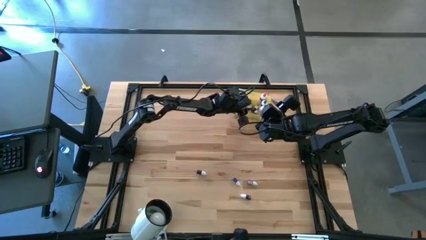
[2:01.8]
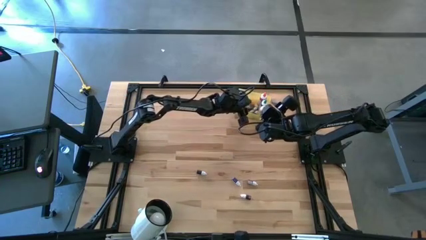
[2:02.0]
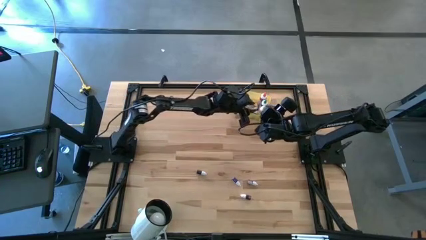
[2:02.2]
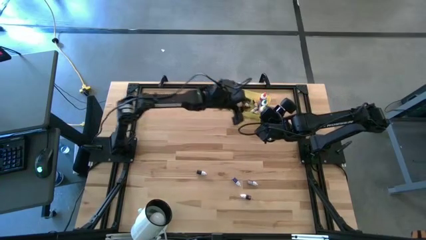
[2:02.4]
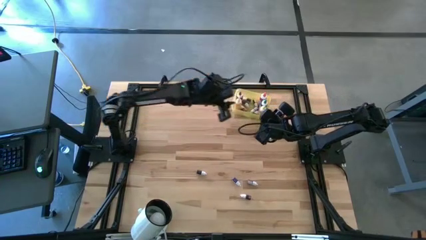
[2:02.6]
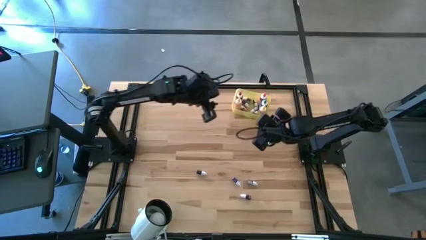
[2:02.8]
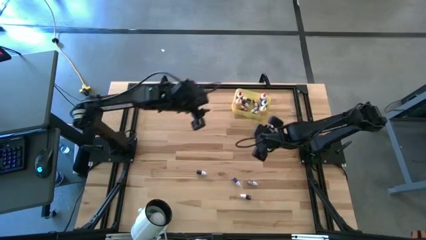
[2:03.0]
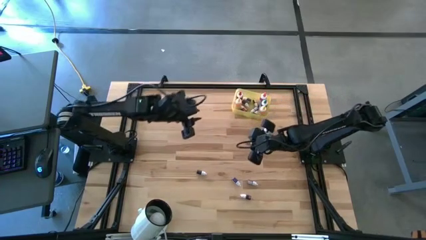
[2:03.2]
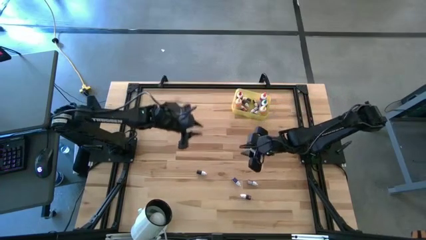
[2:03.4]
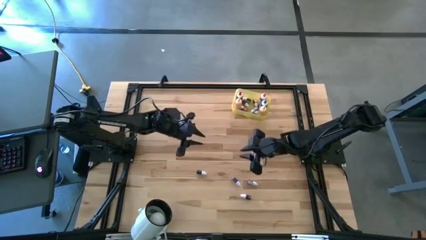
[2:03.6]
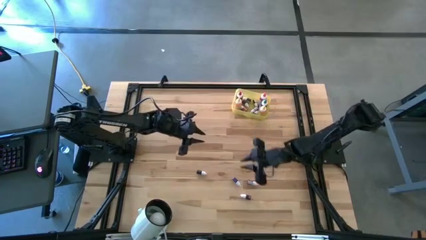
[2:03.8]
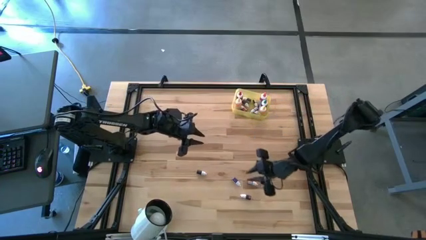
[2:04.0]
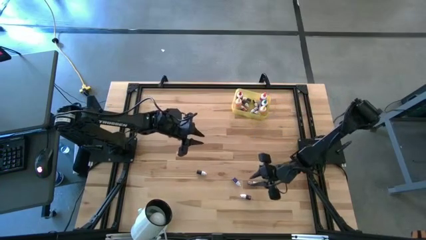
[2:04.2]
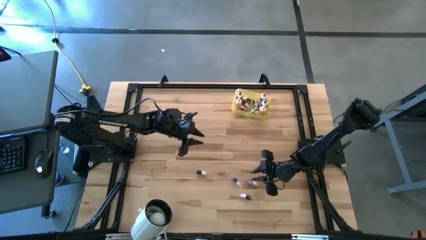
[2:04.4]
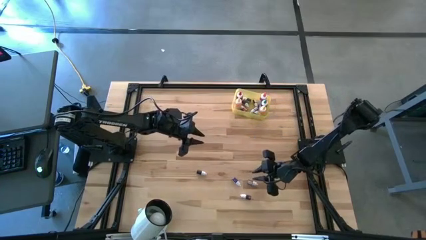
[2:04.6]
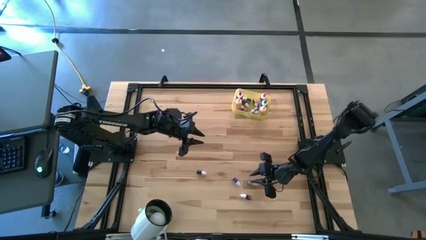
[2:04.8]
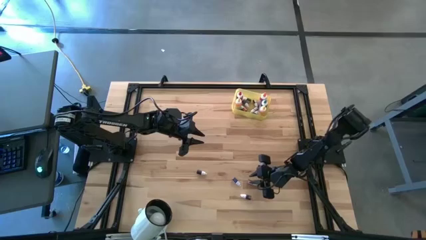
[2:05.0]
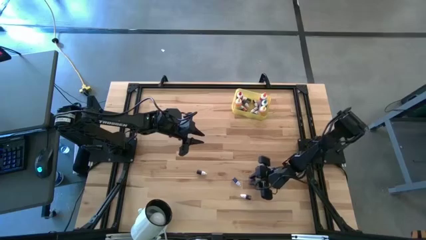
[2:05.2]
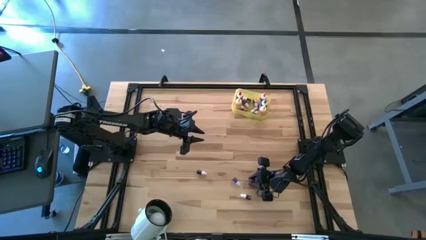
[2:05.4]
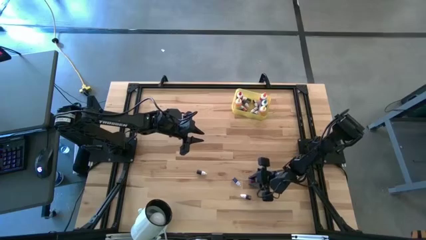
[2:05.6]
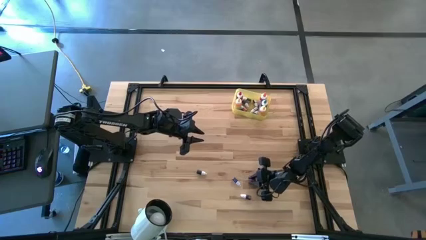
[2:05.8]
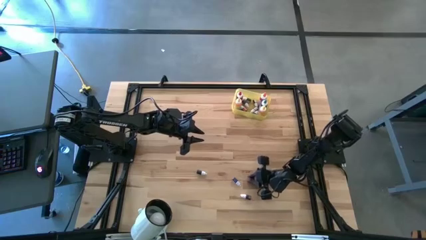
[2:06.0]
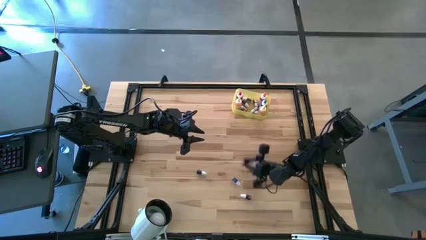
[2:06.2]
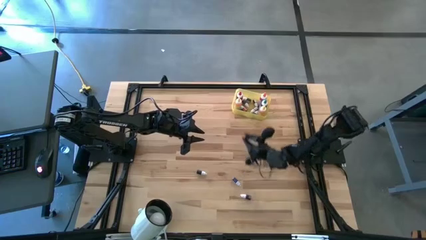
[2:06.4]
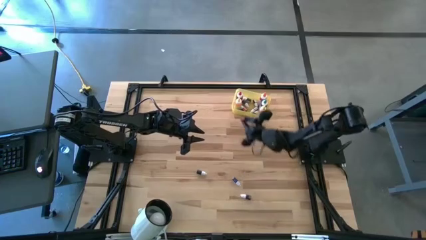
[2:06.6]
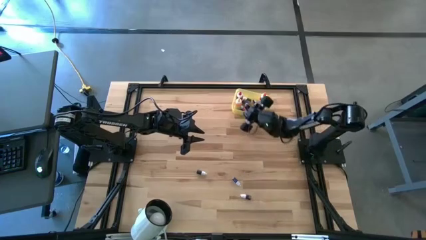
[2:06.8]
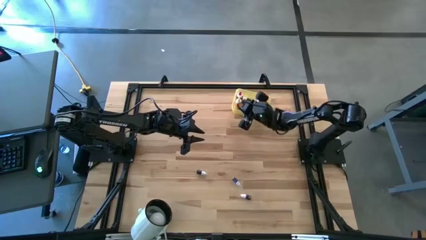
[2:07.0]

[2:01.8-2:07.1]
Task: Pick & Place food coloring
Put the small orange food coloring bottle into the yellow bin

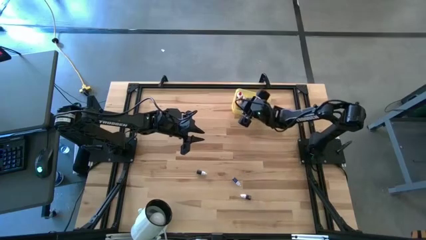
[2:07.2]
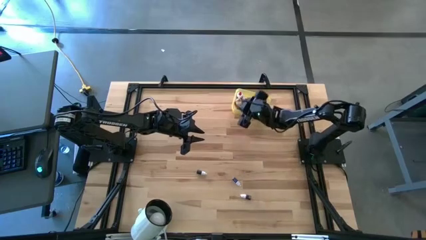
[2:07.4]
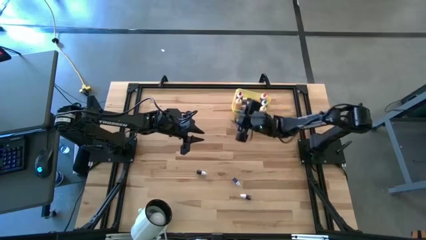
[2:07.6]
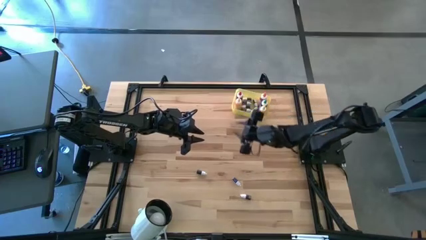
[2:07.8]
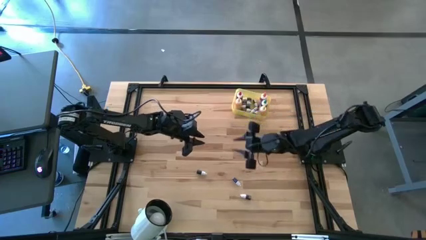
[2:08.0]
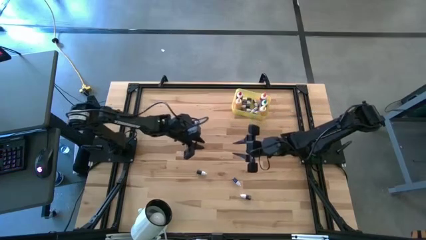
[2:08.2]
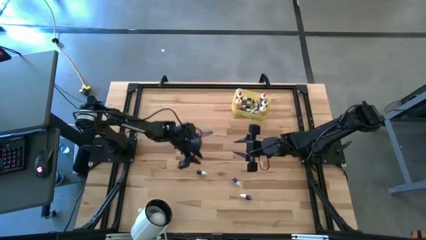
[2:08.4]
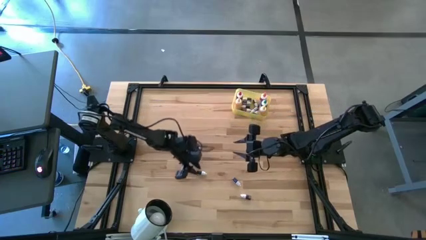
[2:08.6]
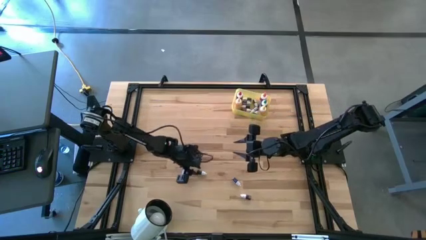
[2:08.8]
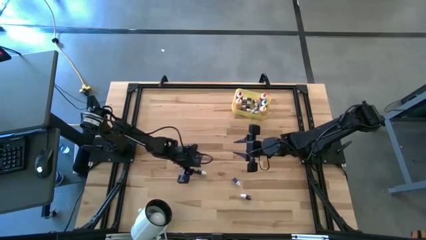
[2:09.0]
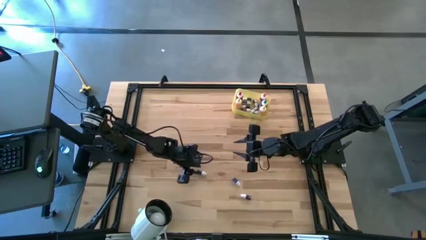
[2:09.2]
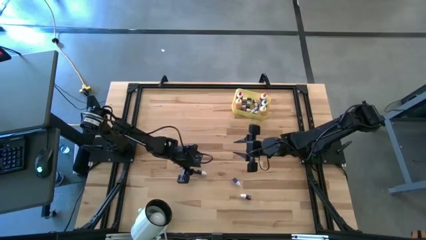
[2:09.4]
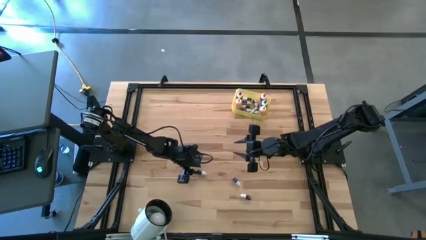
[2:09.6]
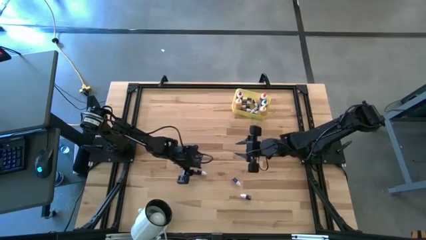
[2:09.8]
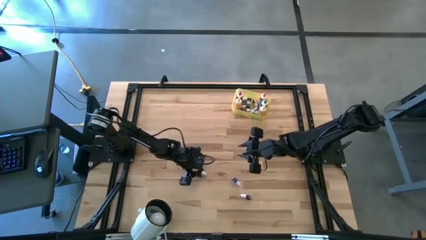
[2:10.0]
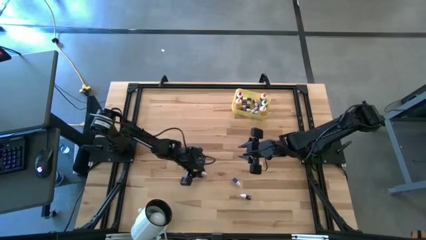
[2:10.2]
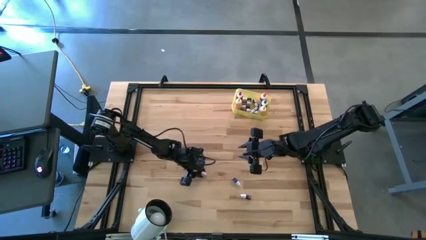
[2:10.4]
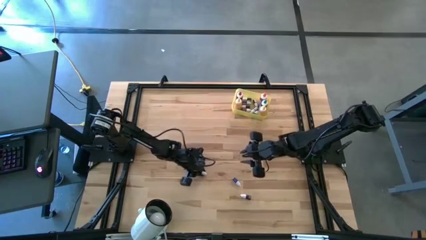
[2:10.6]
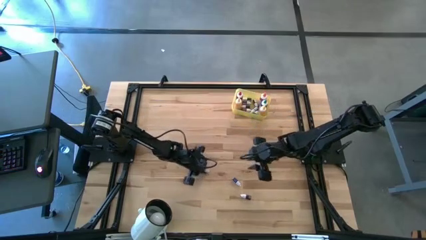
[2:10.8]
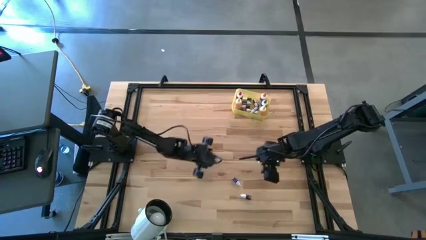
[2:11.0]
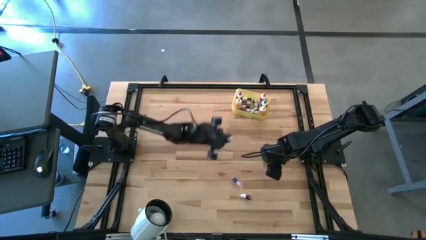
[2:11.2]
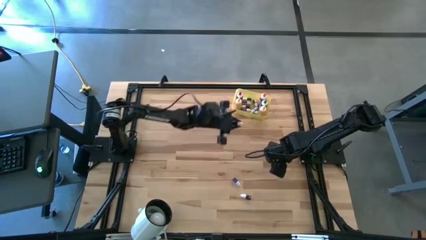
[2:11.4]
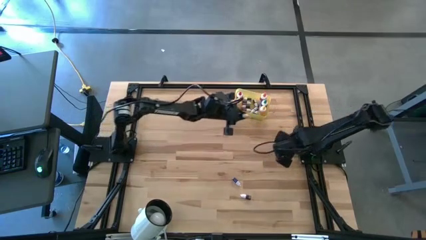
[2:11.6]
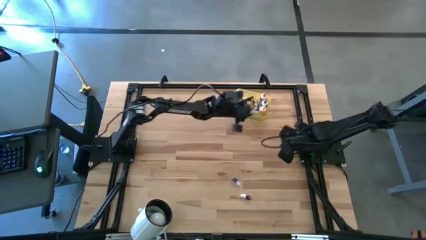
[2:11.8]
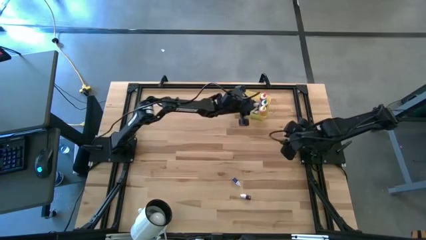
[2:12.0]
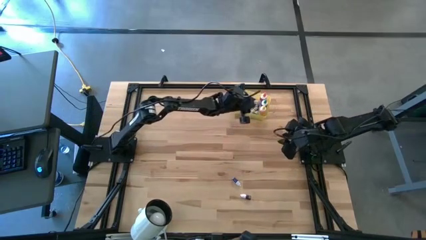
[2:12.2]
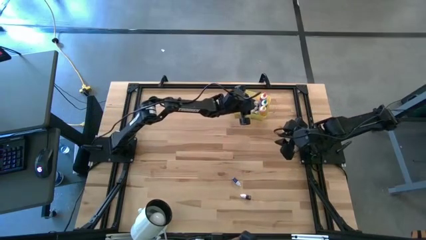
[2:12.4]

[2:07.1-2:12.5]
Put the small blue food coloring bottle into the yellow bin

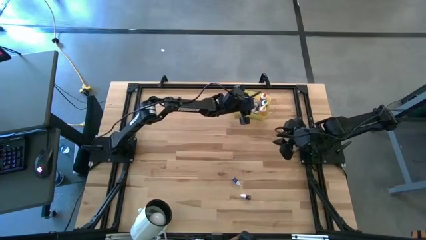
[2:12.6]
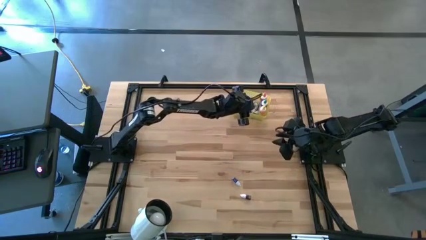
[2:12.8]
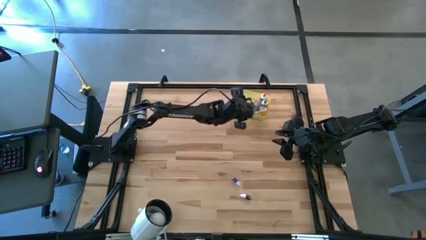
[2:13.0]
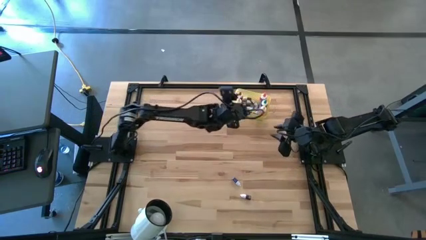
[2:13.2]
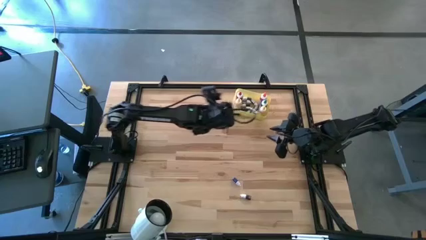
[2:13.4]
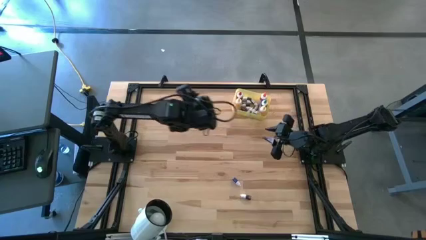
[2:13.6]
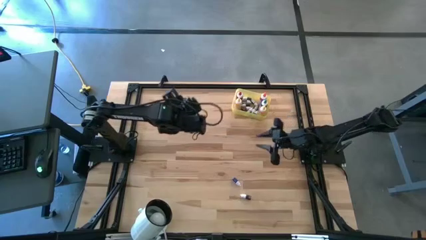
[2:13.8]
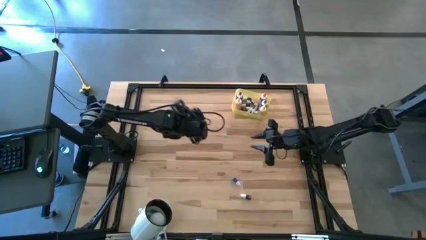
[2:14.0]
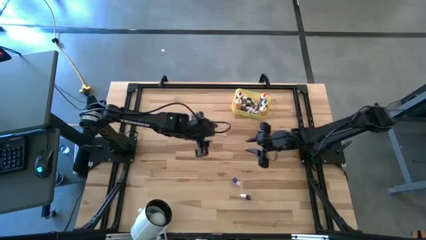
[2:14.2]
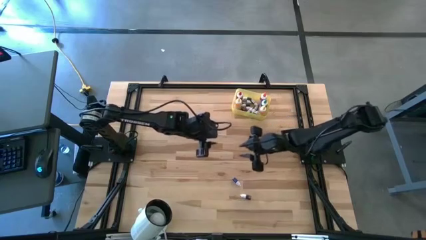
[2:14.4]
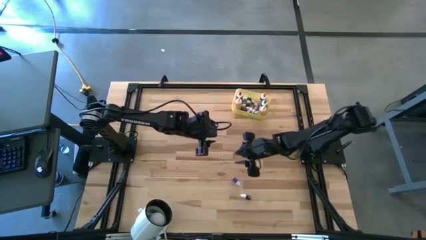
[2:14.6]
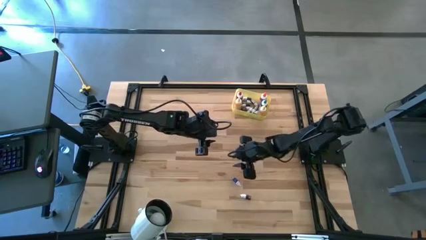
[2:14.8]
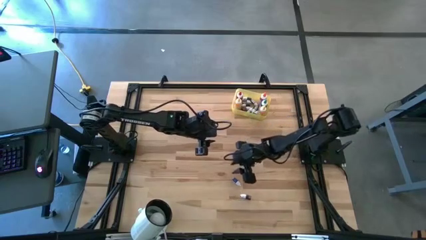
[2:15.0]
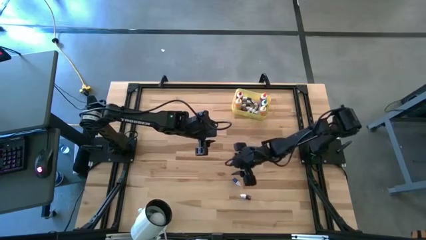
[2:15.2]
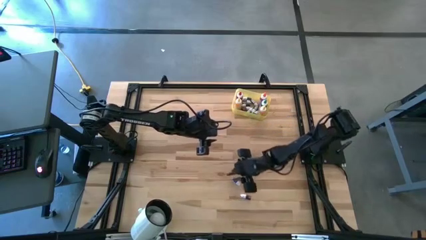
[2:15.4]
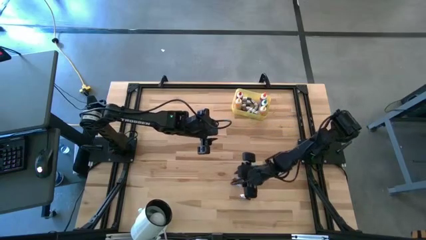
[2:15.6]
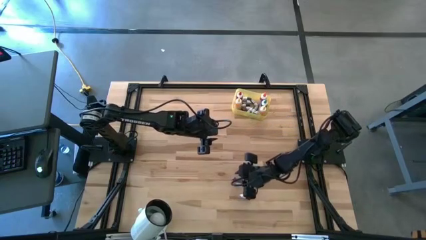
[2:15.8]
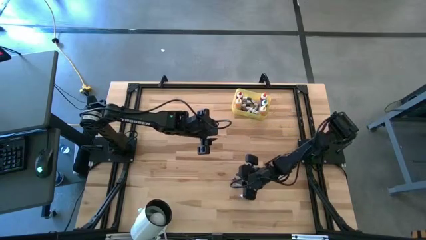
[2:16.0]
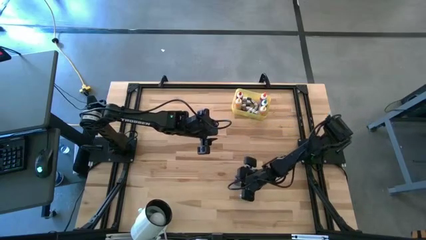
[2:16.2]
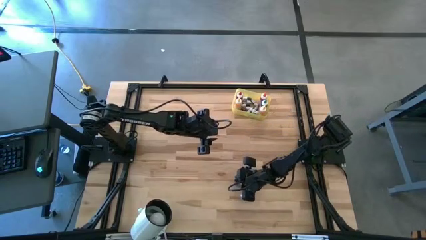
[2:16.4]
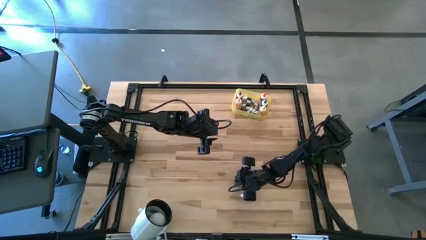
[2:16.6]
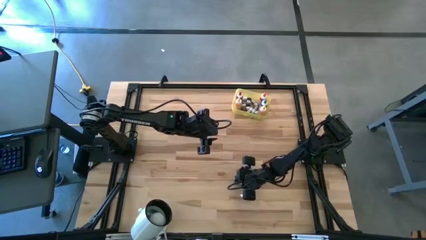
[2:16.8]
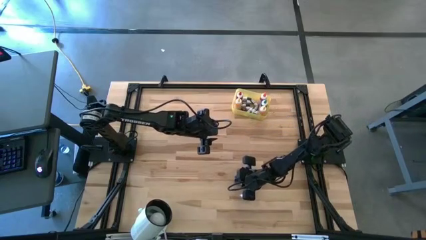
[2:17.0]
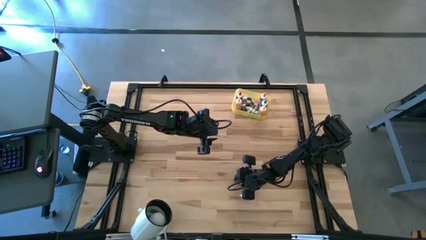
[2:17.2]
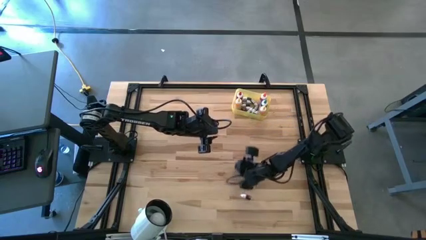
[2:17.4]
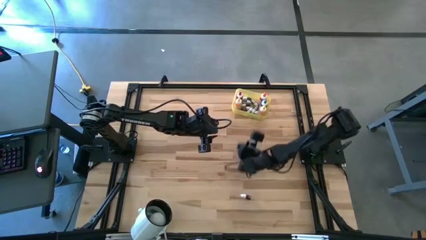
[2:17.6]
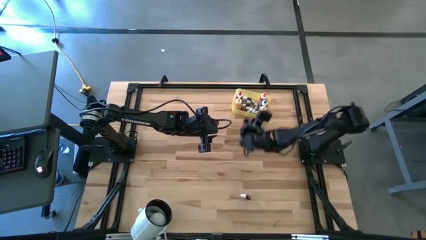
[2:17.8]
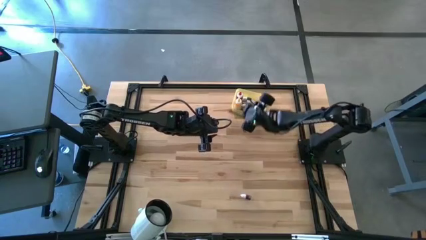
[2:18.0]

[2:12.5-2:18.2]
Put the small violet food coloring bottle into the yellow bin
